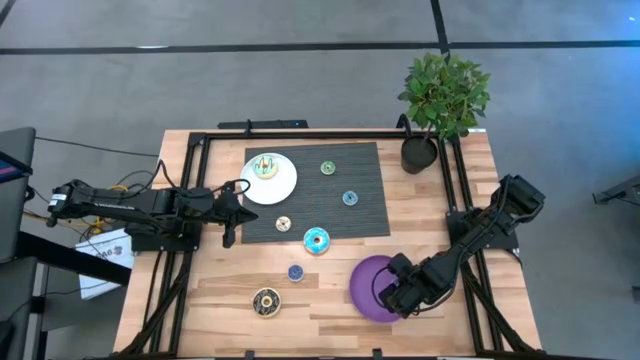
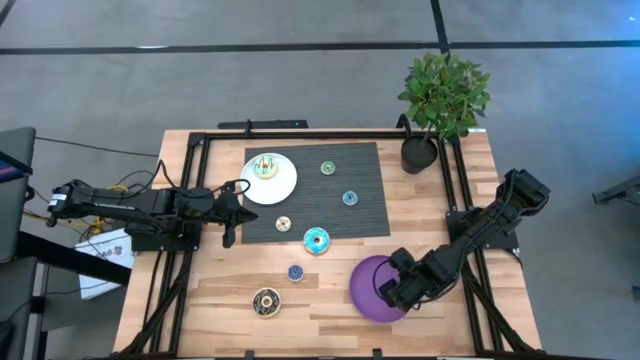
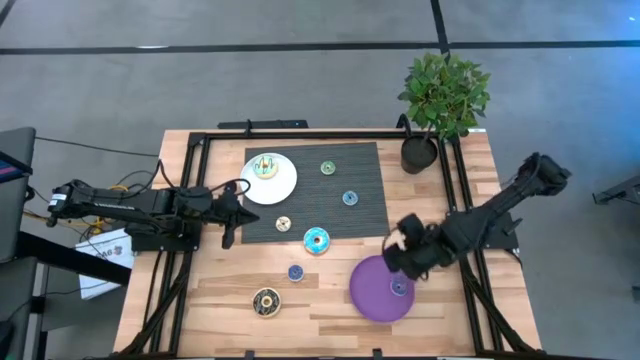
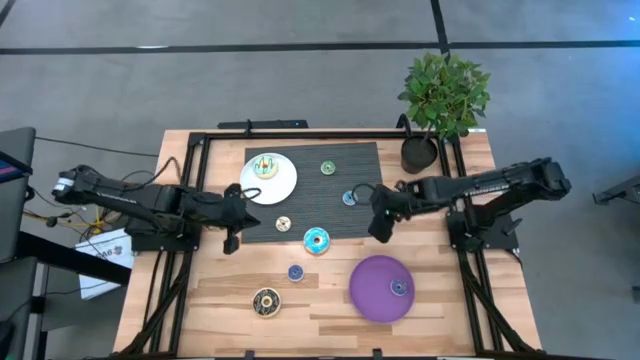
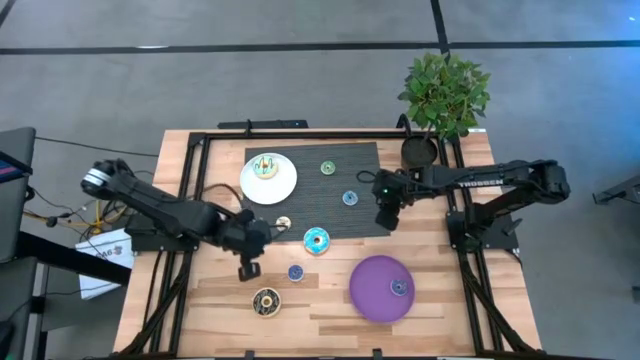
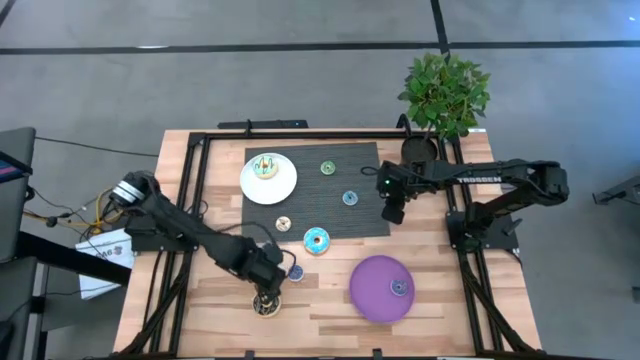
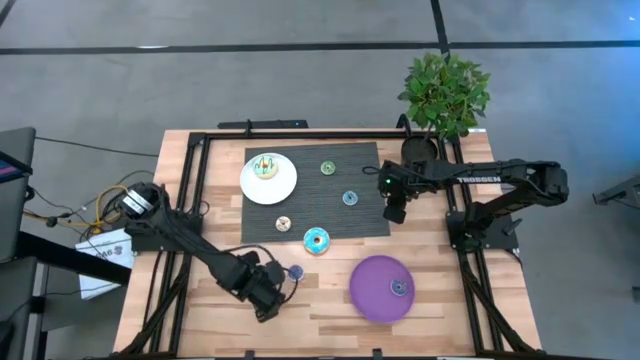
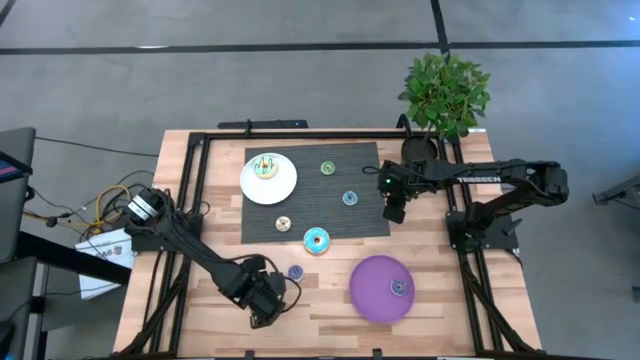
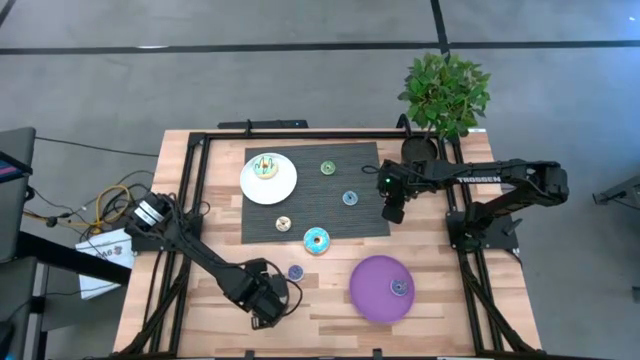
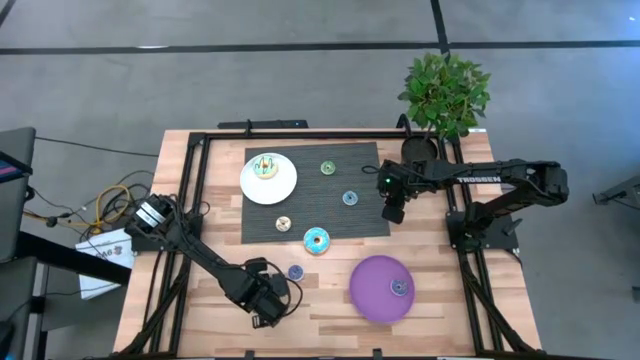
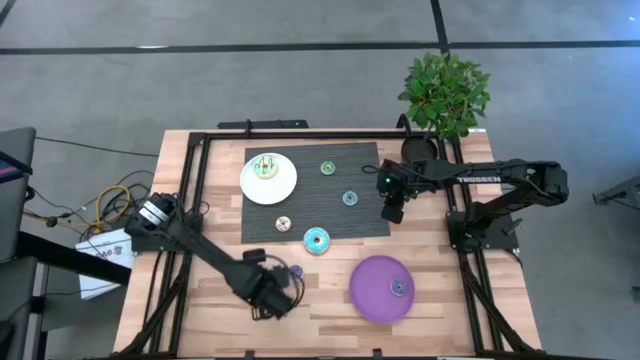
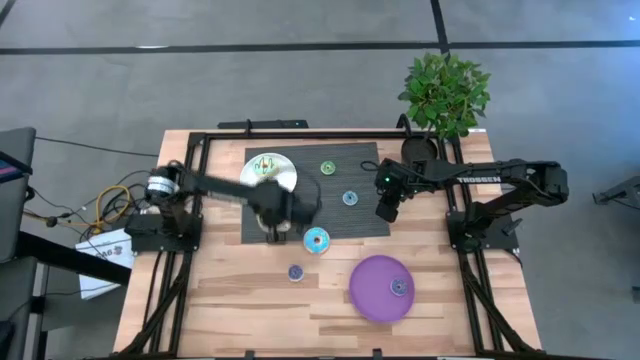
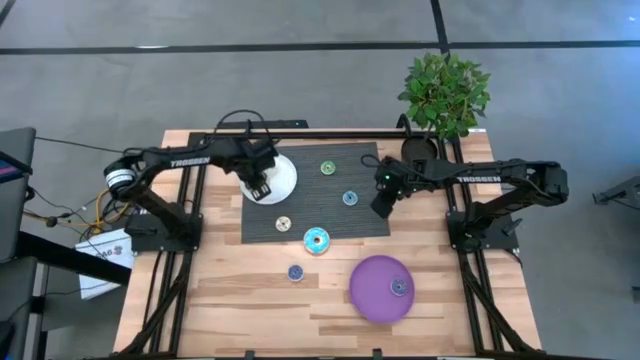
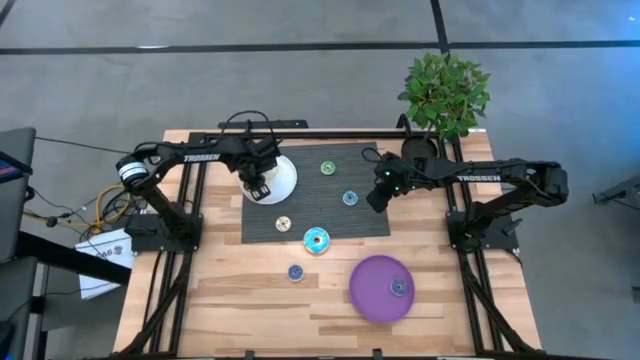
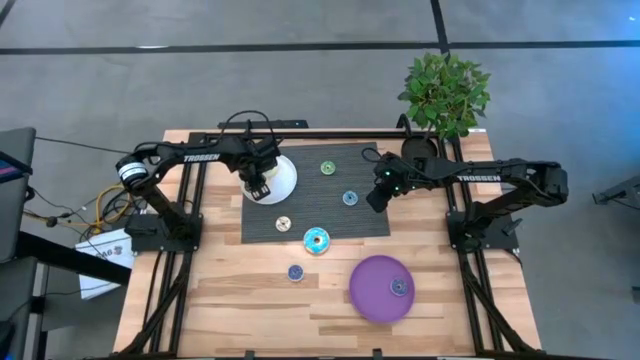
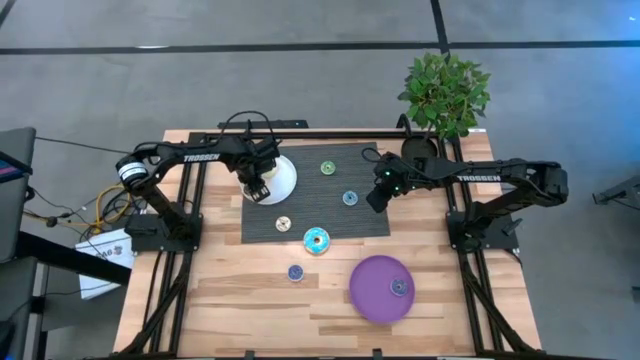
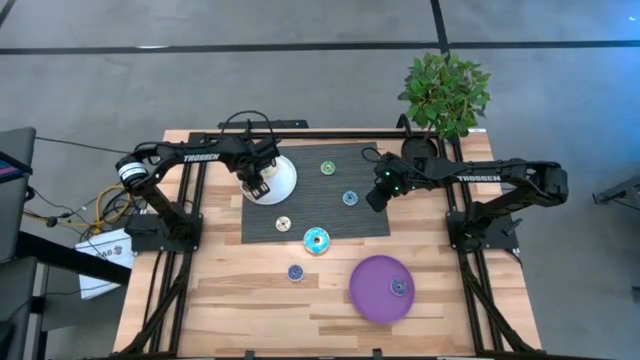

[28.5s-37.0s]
Task: Pick & Place donuts
Put the large black donut on the white plate

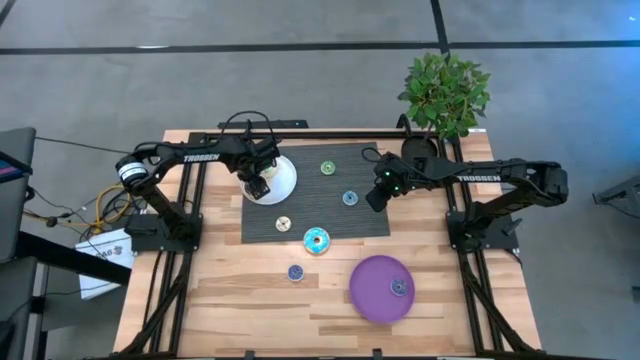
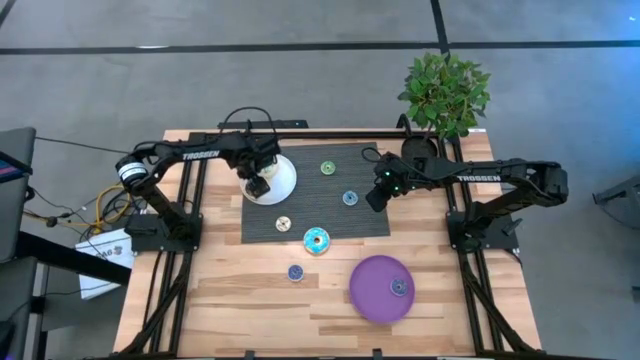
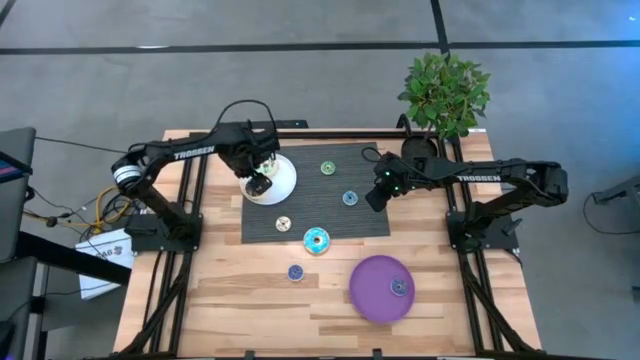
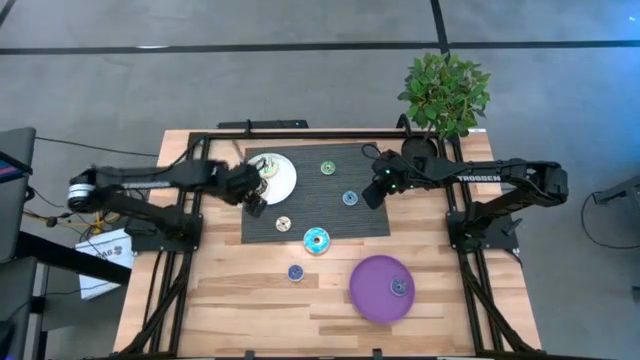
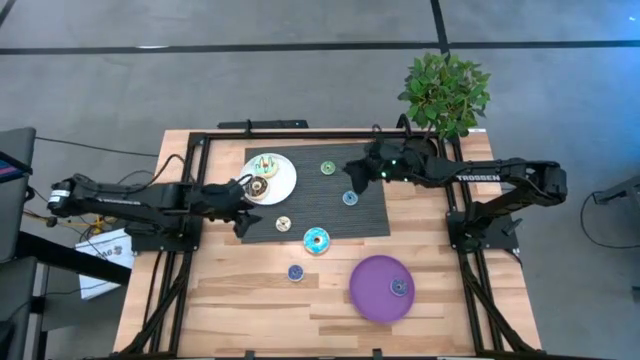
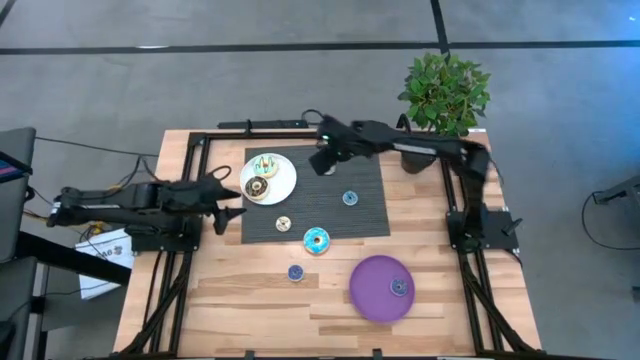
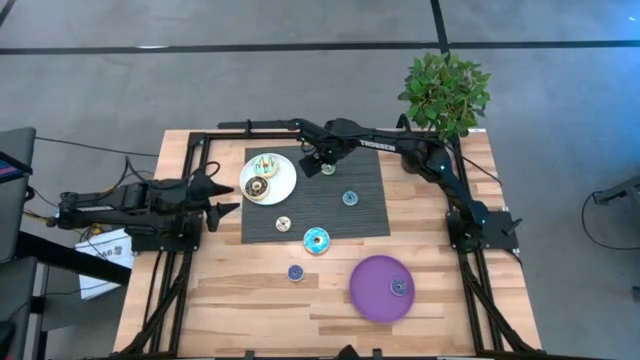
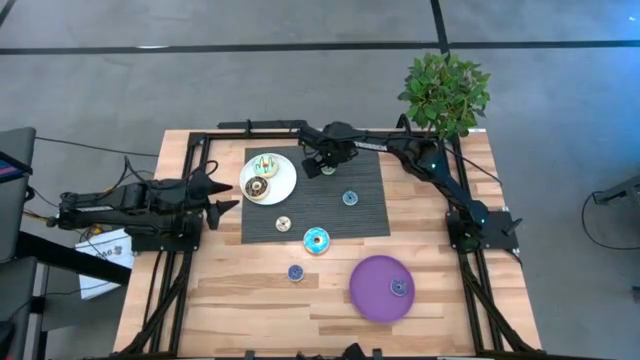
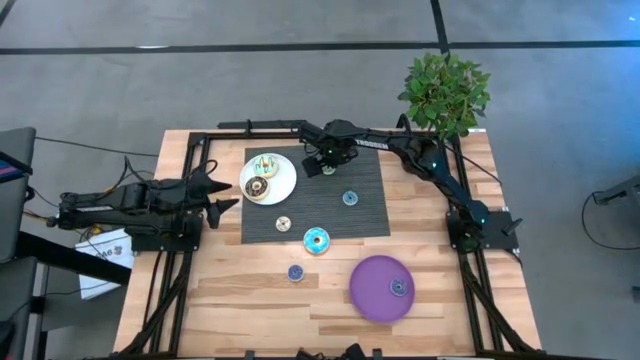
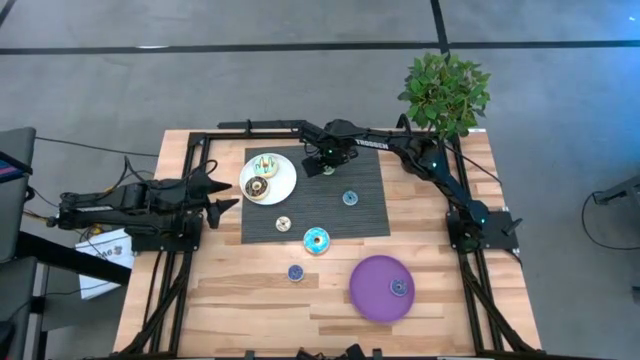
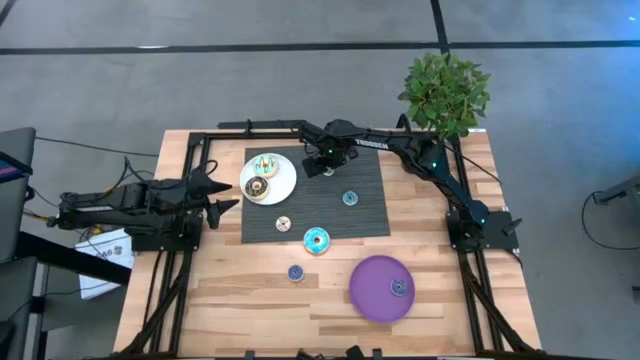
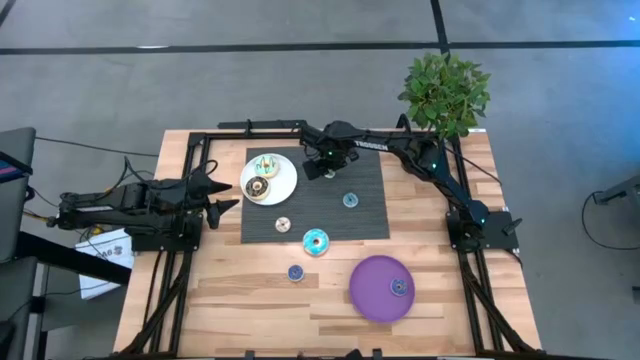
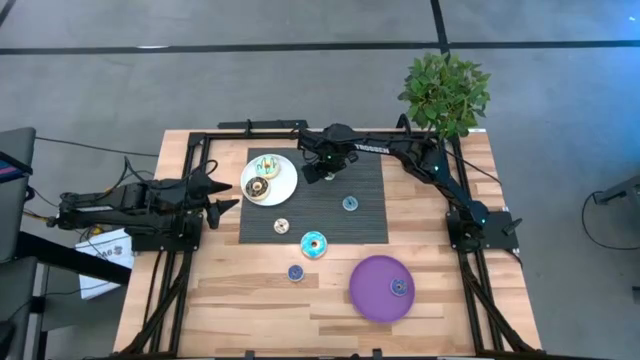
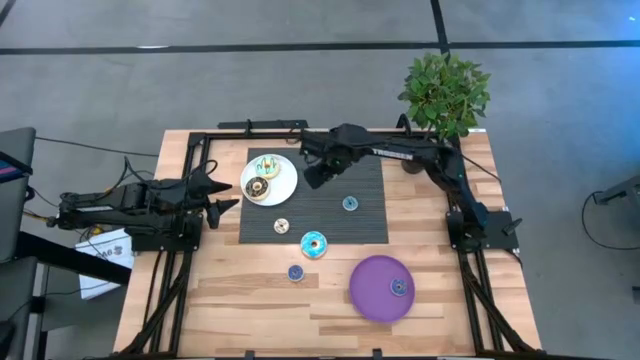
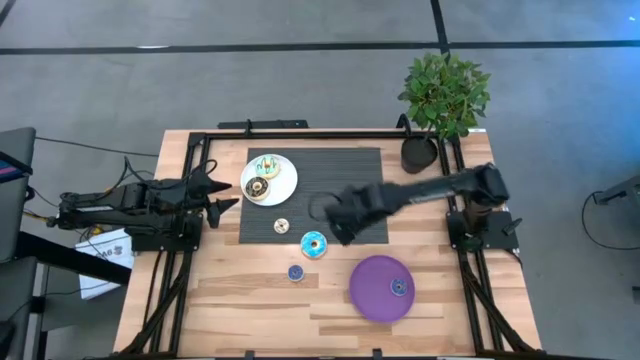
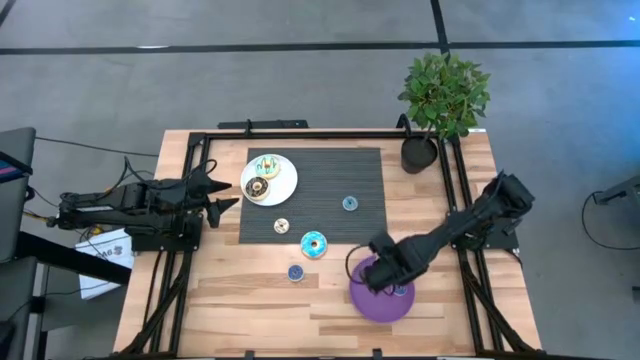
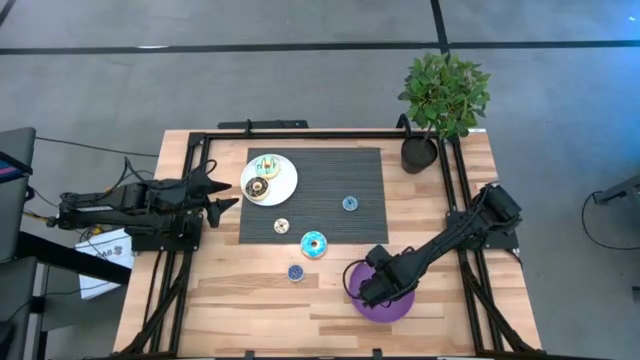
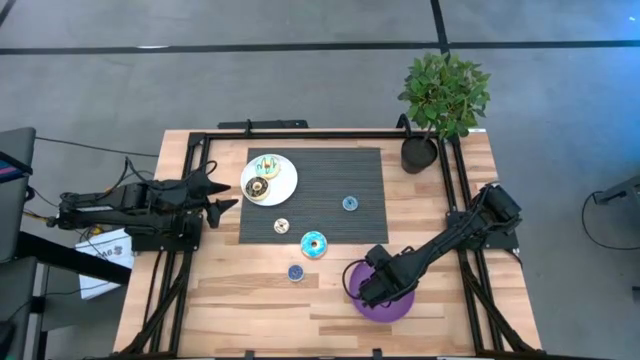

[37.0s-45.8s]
Put the small green donut on the purple plate

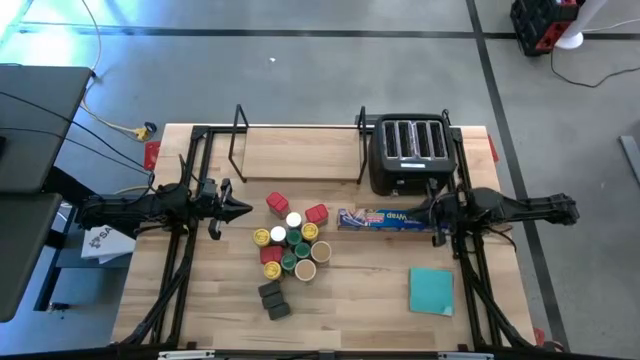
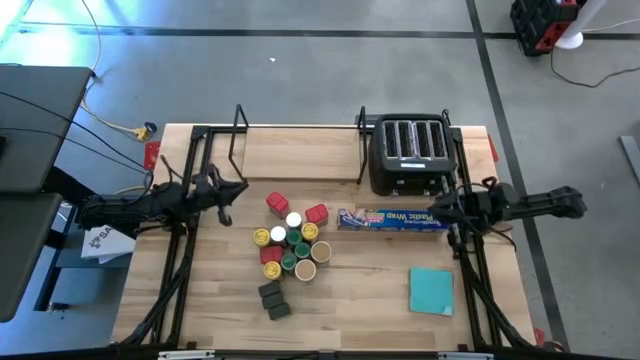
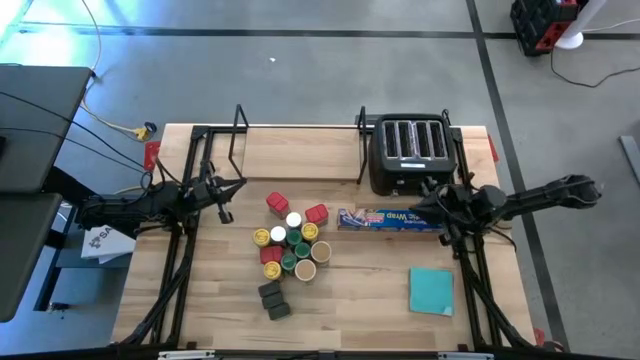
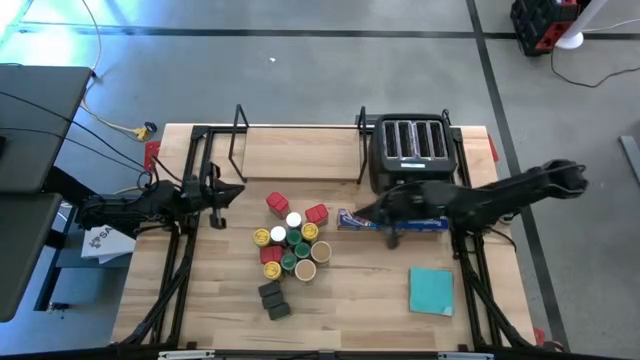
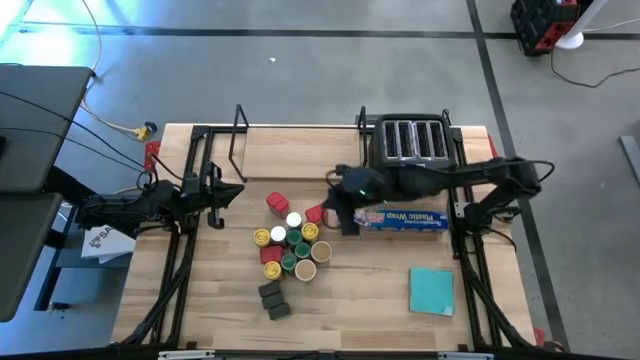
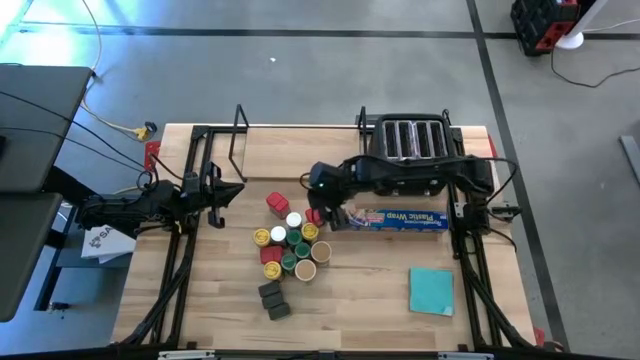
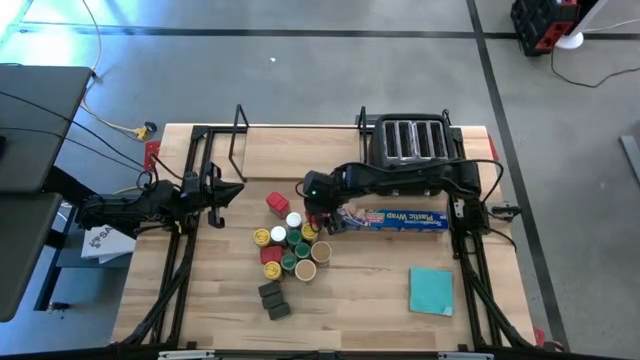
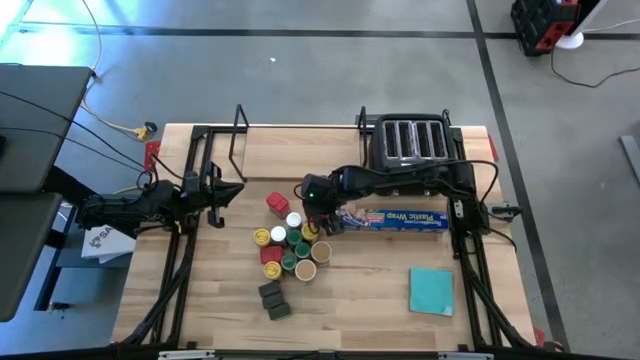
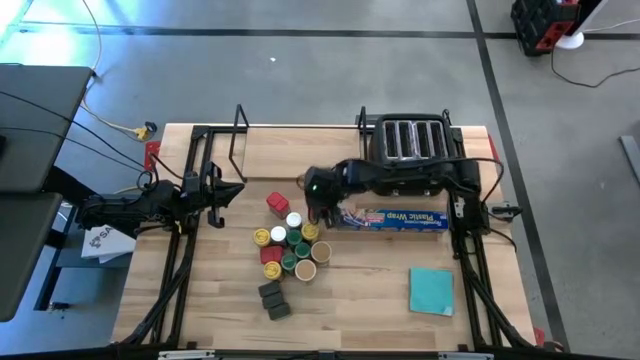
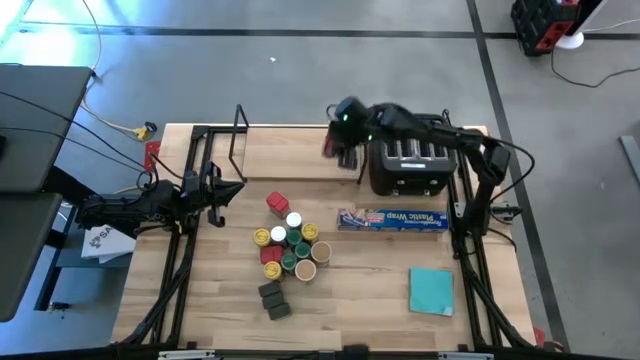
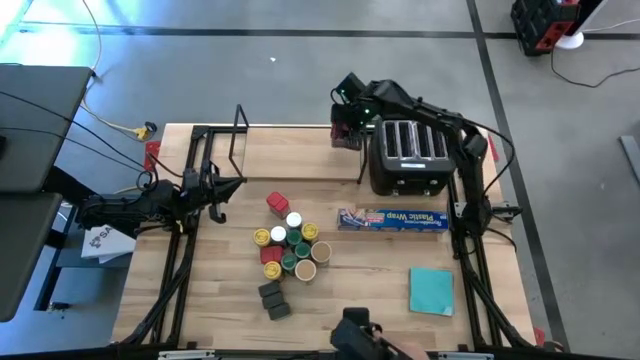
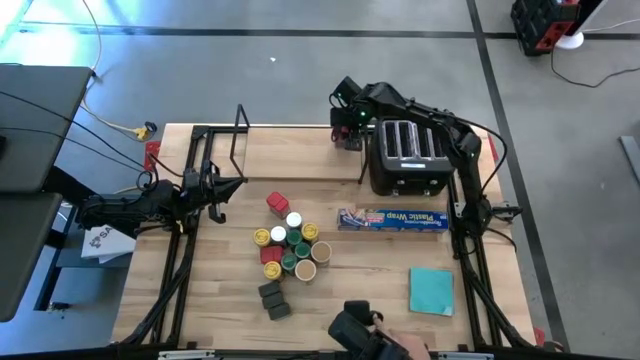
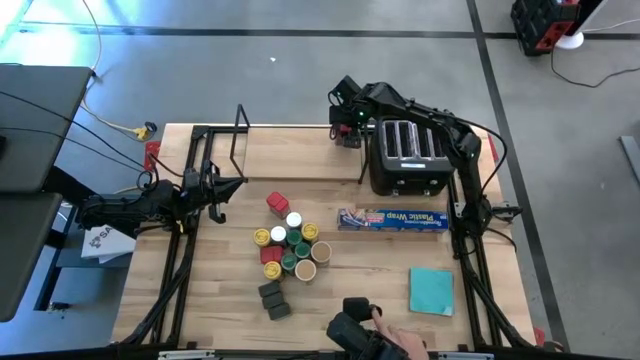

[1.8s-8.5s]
Task: Shelf spices
Put the top right red seasoning can on the shelf
